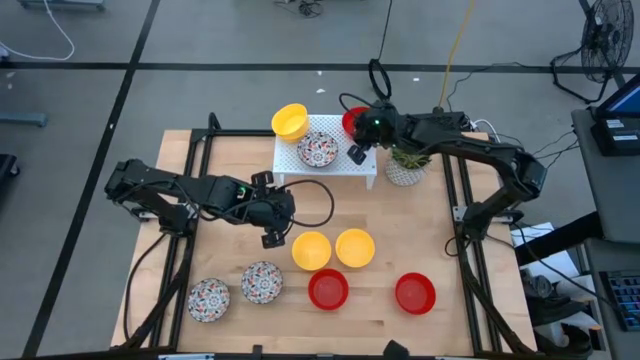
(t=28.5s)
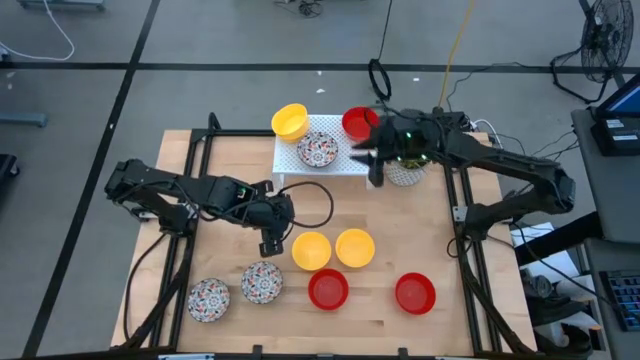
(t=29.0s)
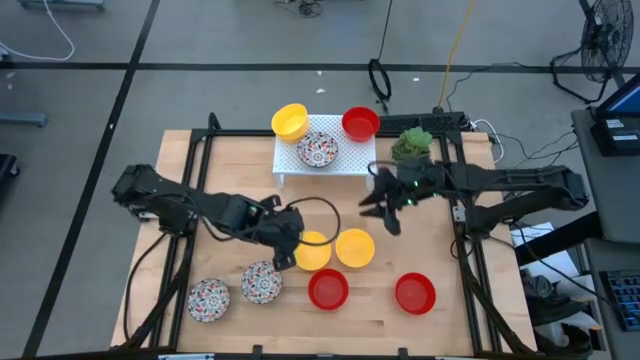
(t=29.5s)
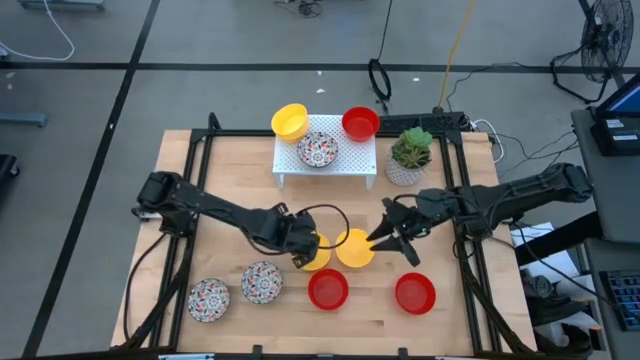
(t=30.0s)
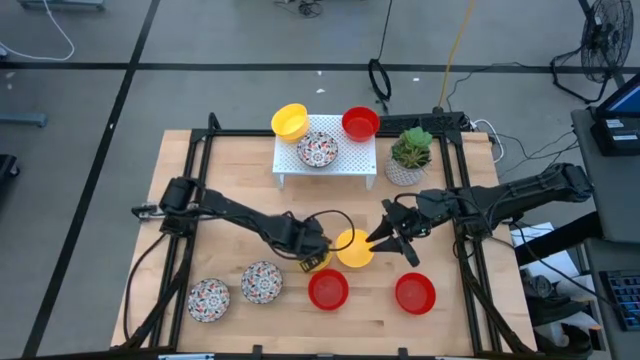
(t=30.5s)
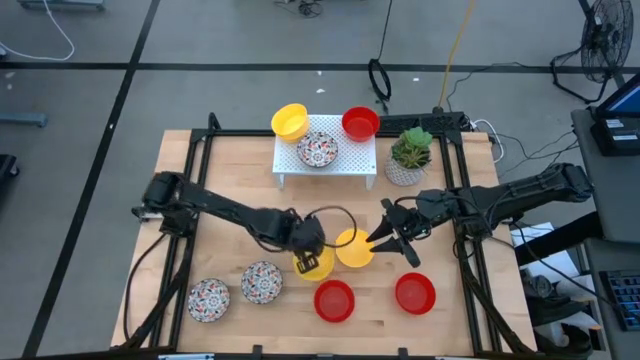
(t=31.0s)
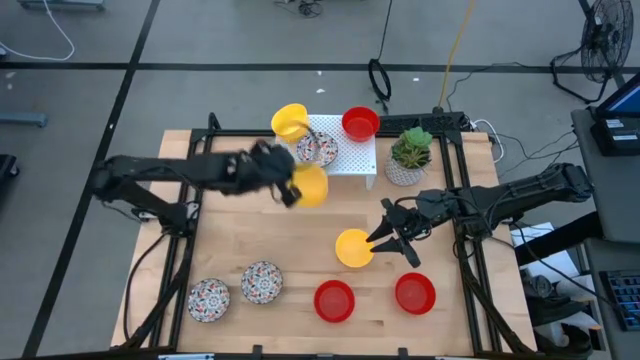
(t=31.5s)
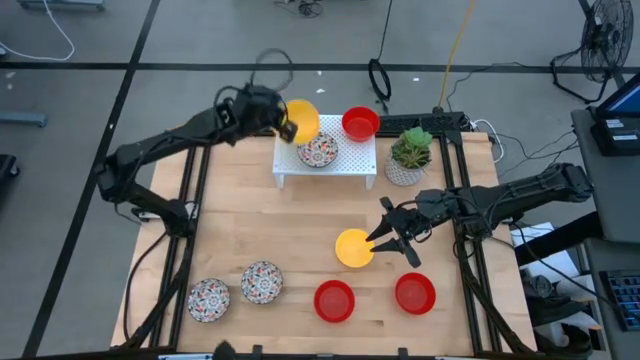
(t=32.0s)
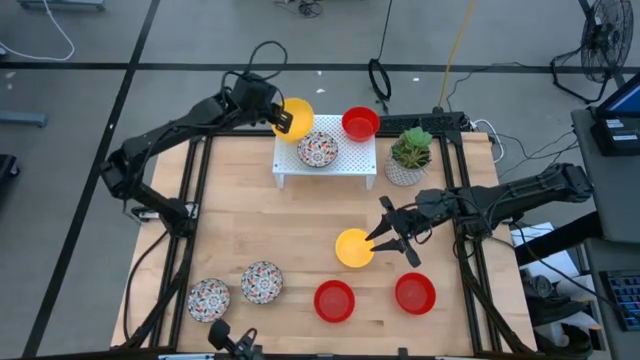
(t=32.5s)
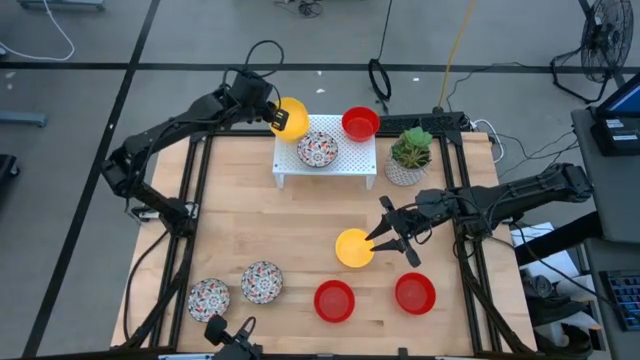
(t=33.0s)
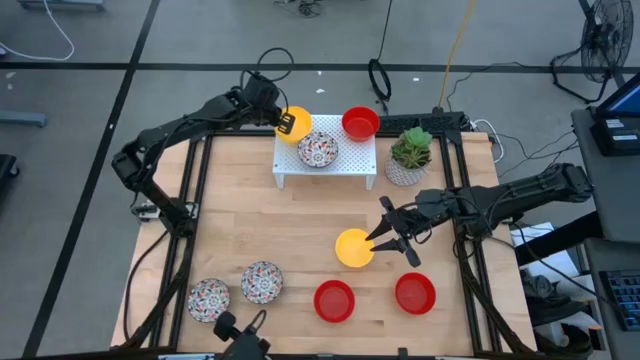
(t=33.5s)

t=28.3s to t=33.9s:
Task: Pick & Place Mini bowls
Stack the yellow bowl on the yellow bowl on the shelf

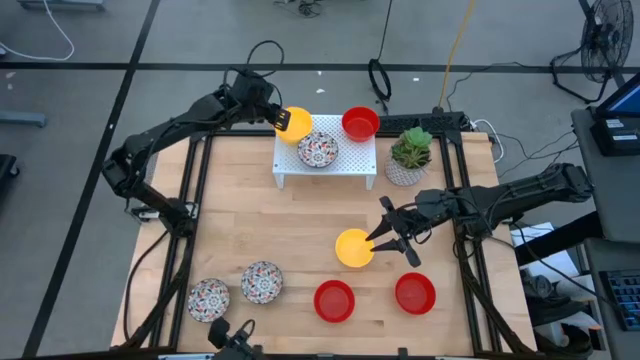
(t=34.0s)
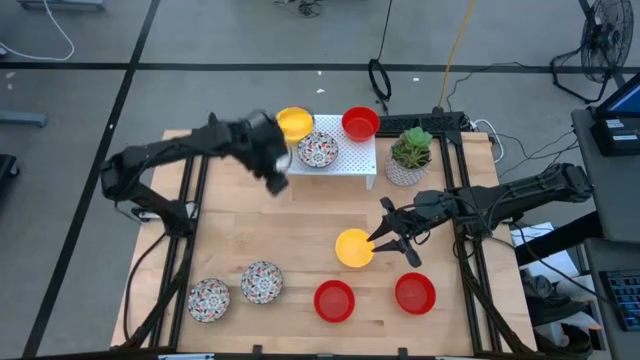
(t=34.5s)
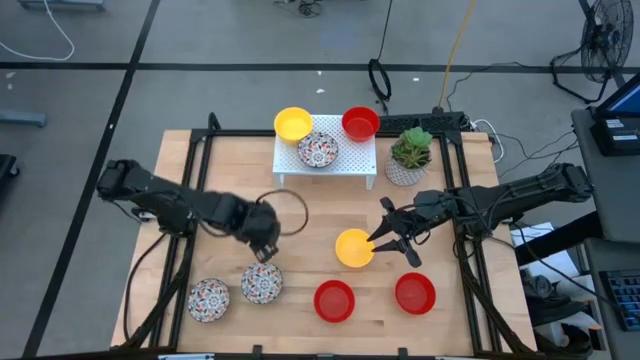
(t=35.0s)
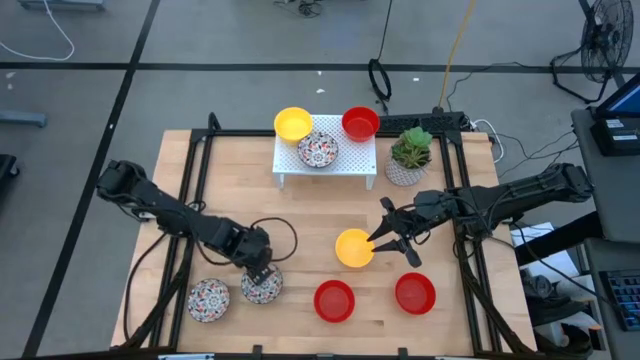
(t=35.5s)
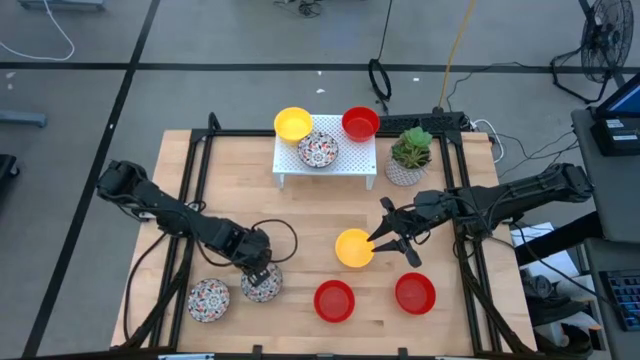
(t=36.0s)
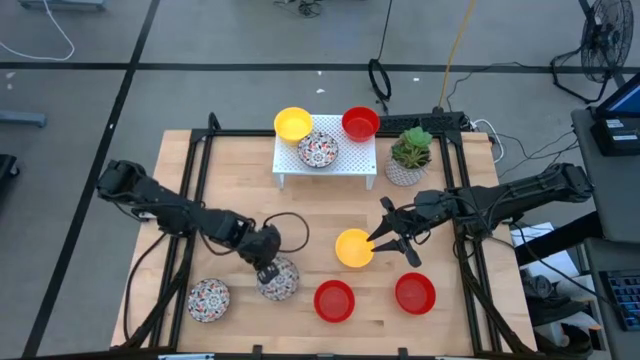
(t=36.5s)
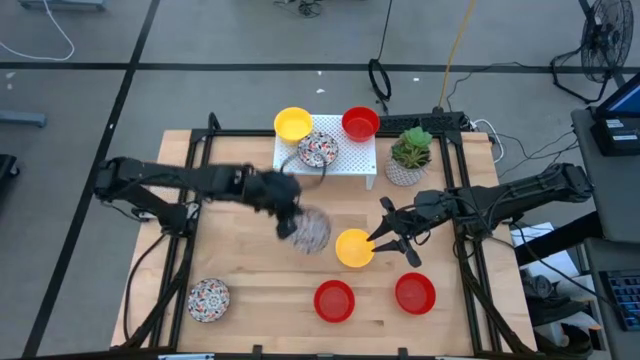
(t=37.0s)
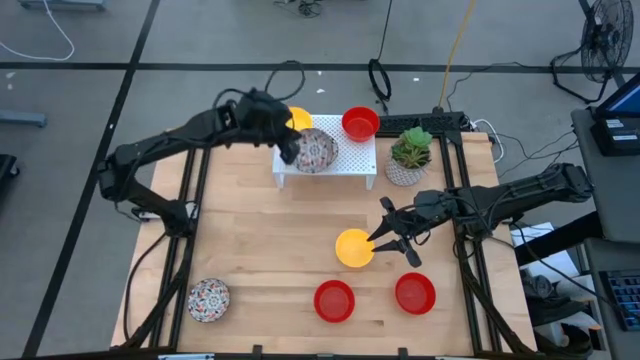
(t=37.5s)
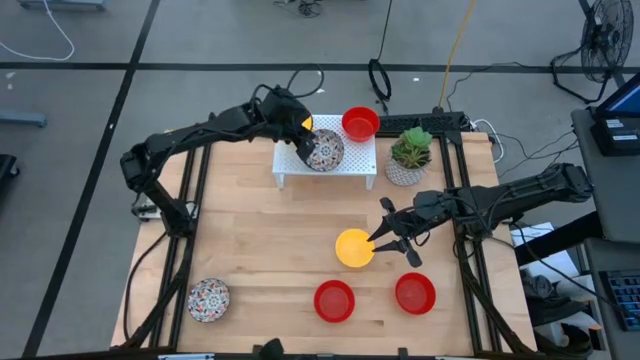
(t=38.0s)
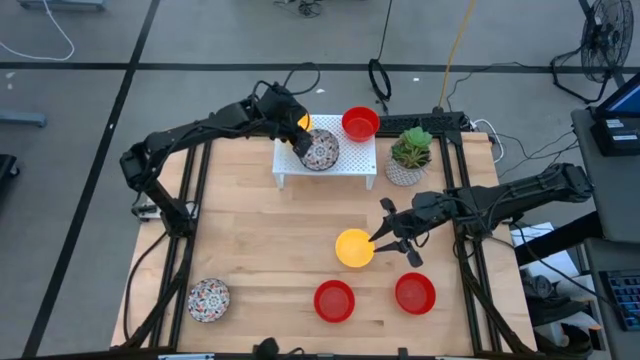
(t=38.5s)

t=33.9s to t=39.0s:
Stack the white patterned bowl on the white patterned bowl on the shelf

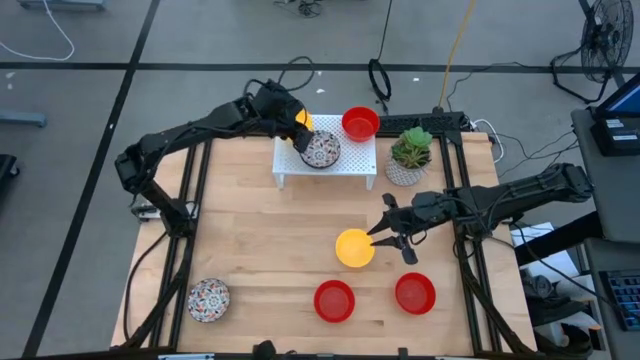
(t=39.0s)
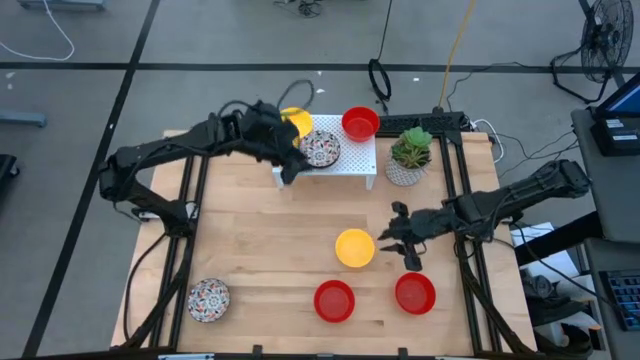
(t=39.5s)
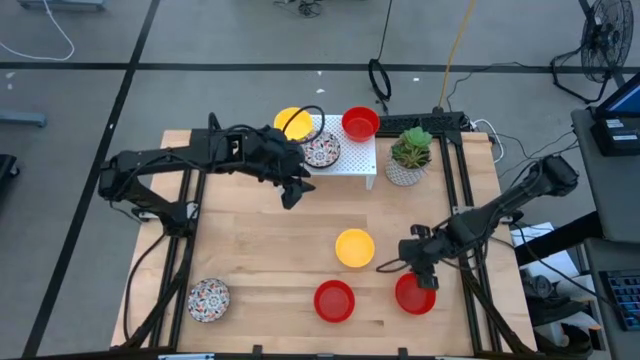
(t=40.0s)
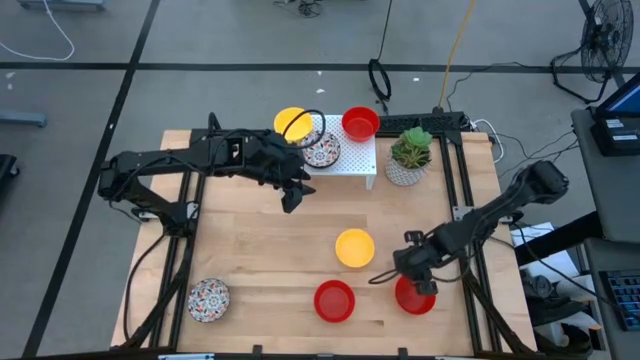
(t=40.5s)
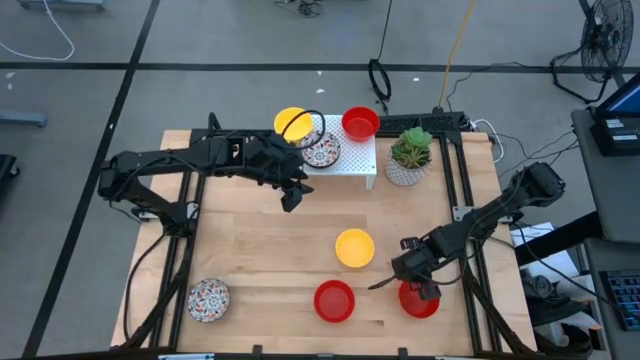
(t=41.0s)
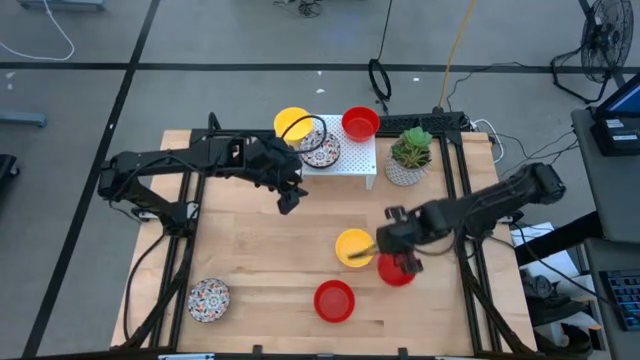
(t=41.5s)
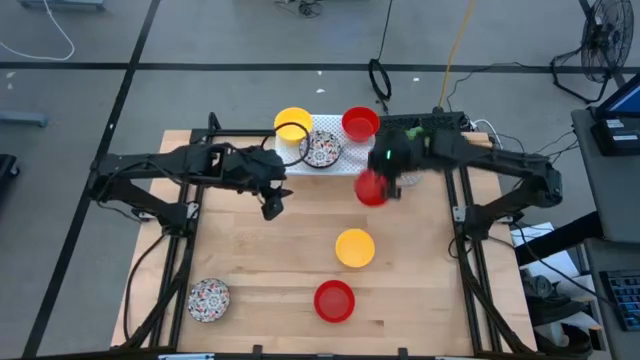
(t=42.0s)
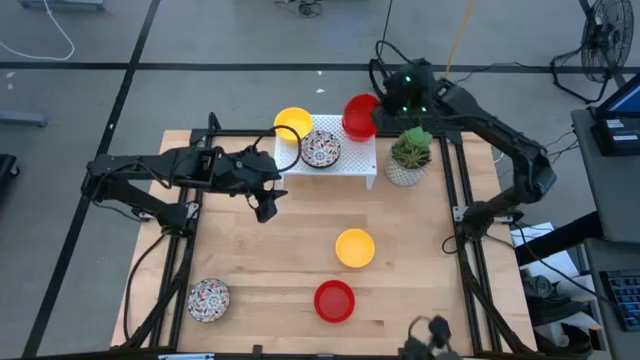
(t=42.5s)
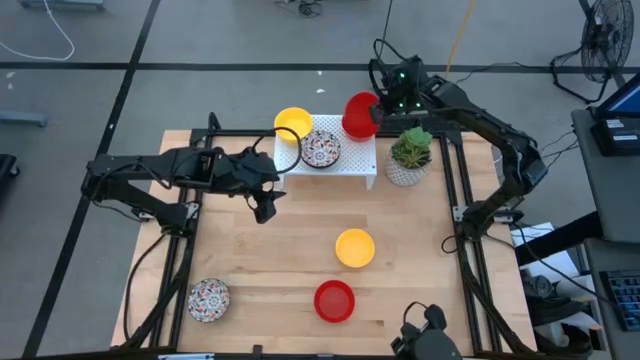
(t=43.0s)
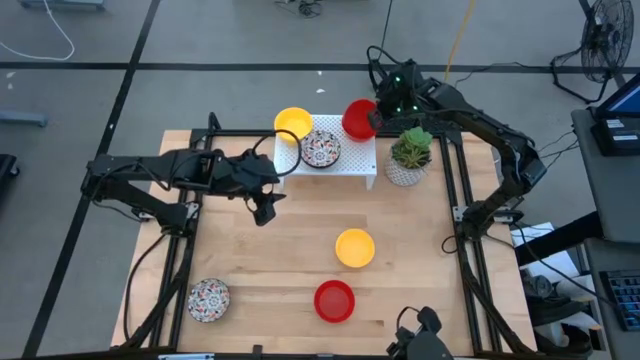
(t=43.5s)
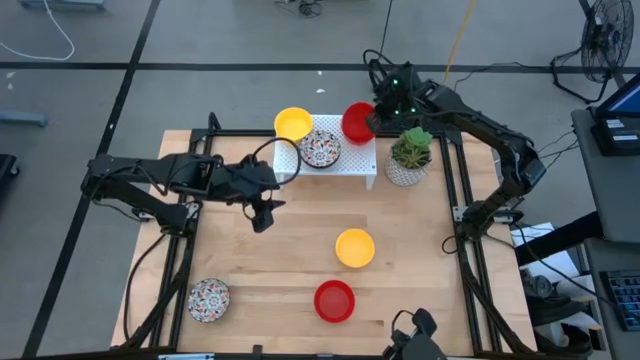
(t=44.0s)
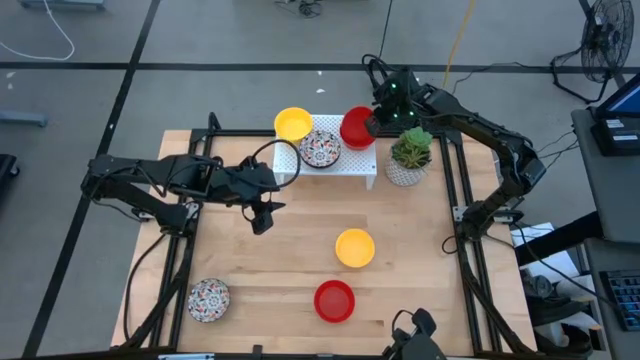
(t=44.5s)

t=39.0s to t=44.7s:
Stack the red bowl on the red bowl on the shelf

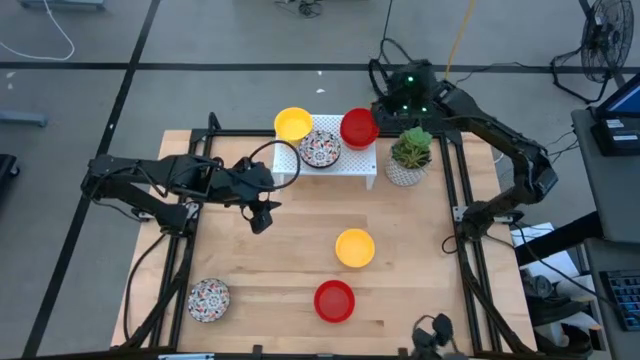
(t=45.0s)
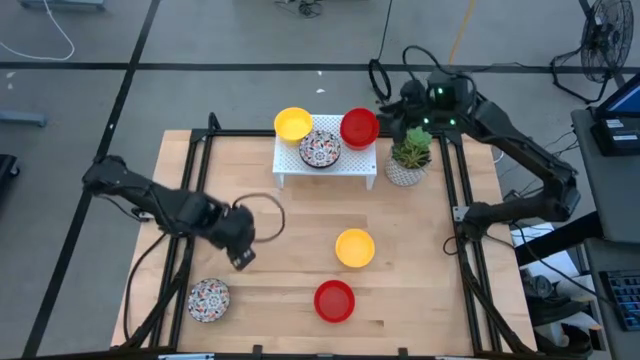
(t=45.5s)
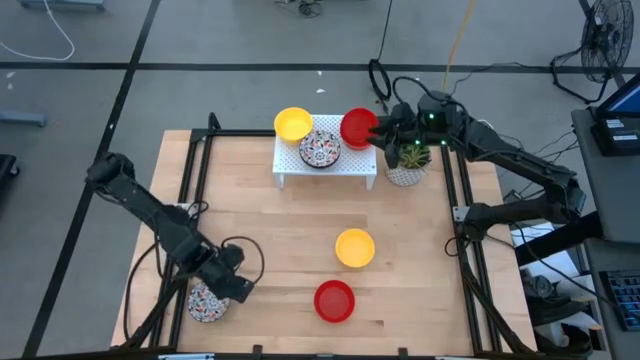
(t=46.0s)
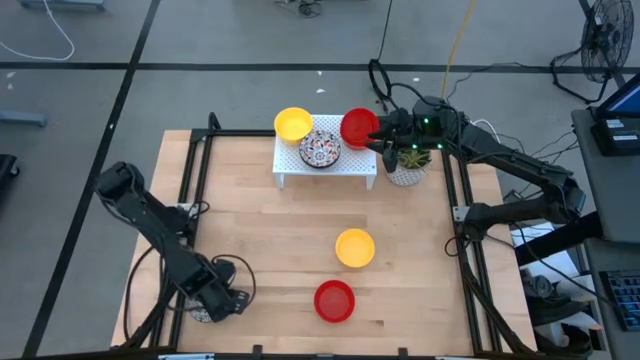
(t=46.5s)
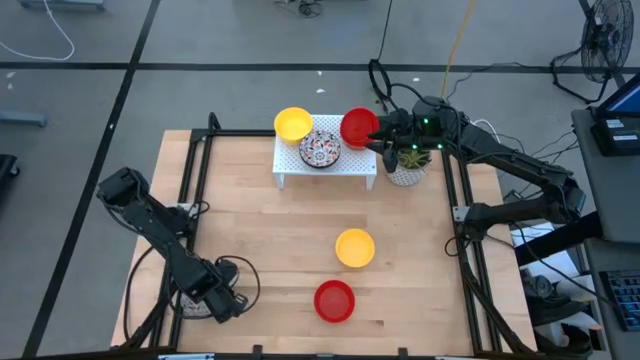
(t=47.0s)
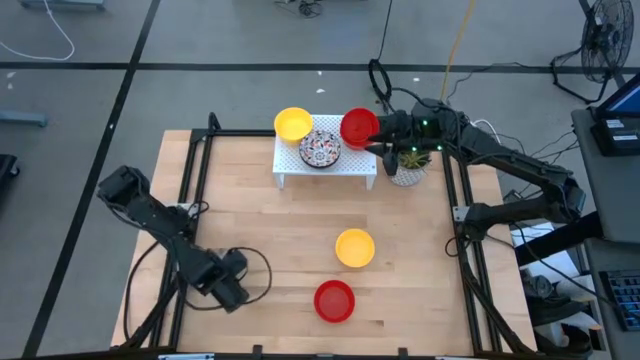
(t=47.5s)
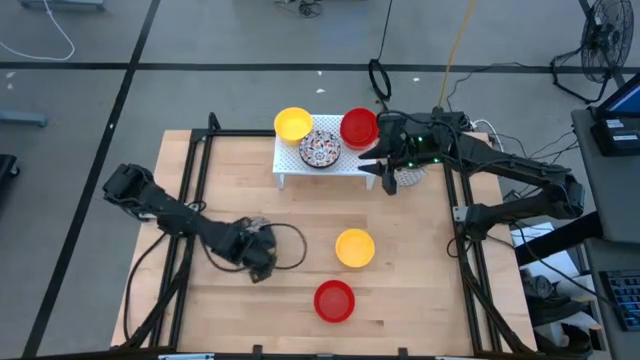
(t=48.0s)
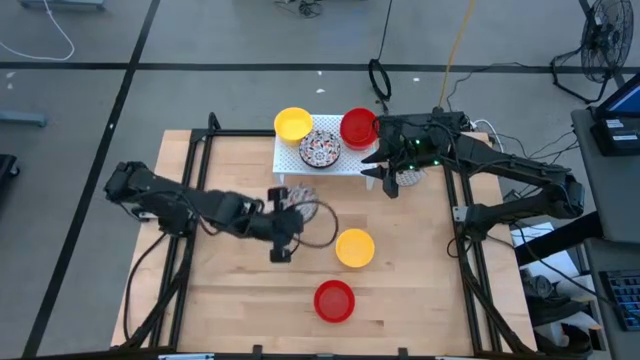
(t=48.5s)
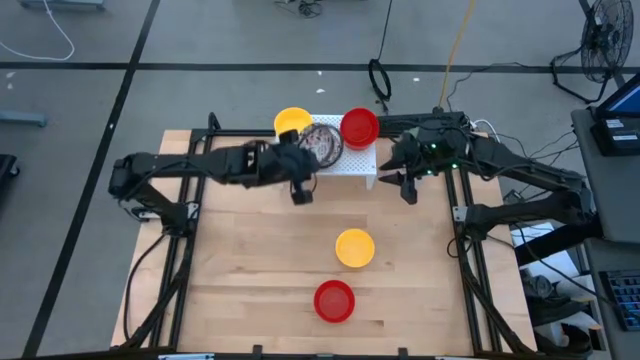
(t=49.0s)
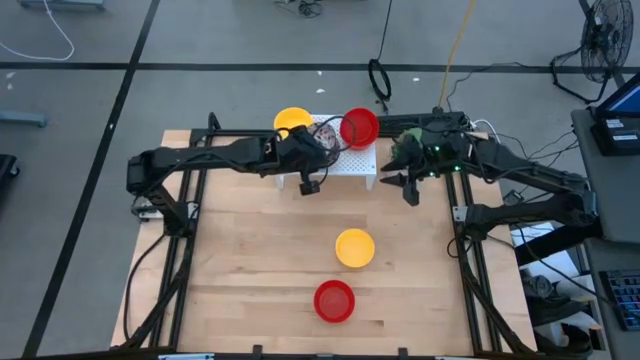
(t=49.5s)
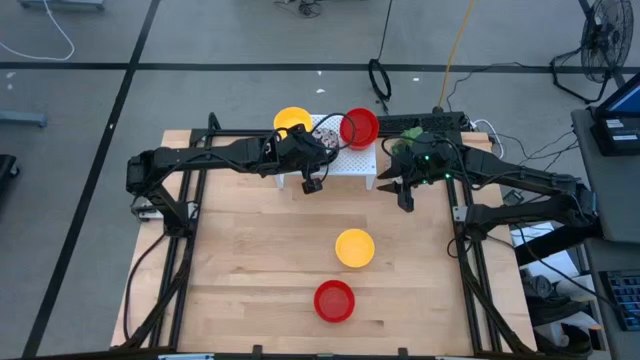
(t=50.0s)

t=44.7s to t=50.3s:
Stack the white patterned bowl on the white patterned bowl on the shelf
